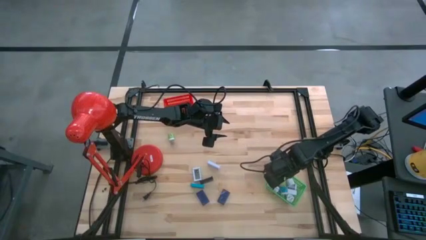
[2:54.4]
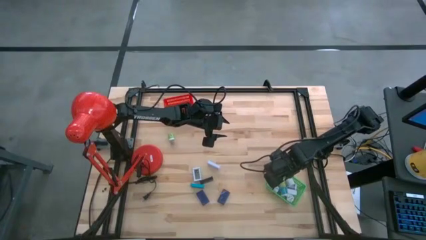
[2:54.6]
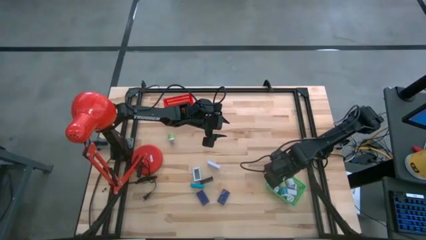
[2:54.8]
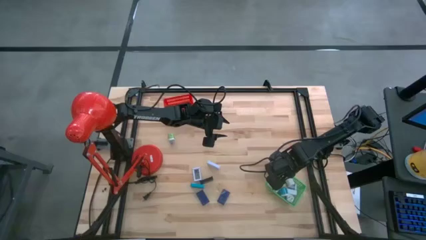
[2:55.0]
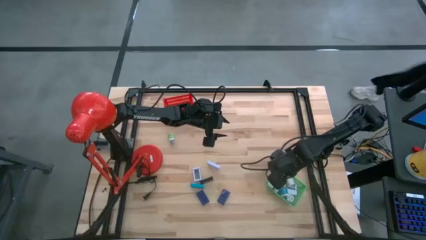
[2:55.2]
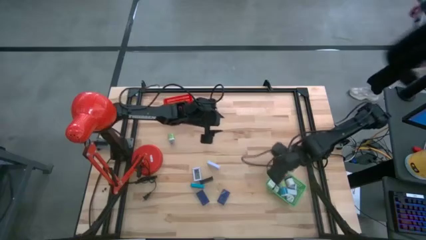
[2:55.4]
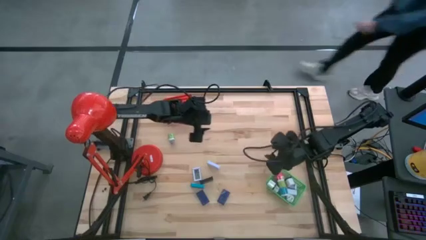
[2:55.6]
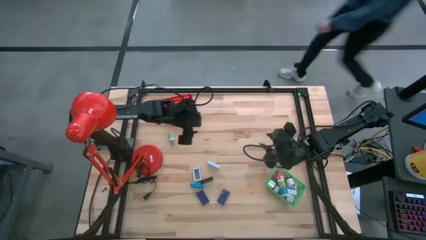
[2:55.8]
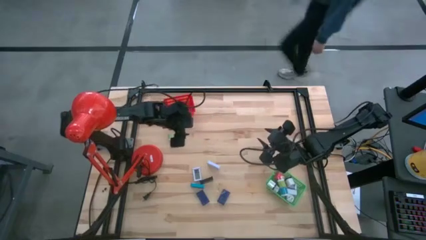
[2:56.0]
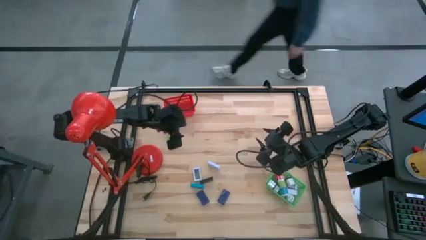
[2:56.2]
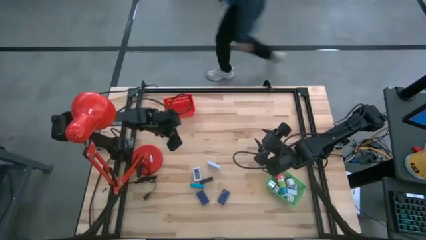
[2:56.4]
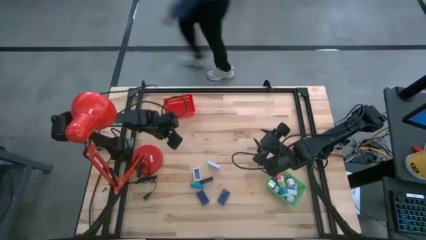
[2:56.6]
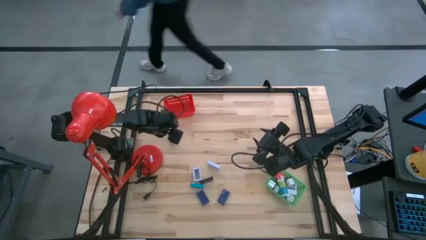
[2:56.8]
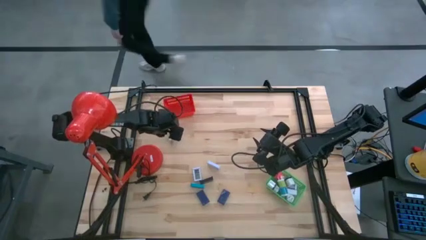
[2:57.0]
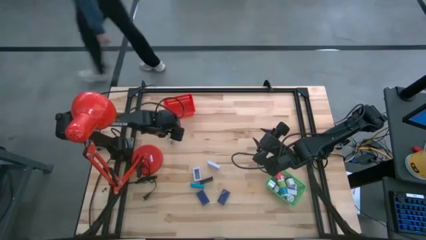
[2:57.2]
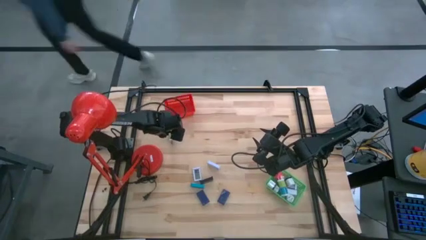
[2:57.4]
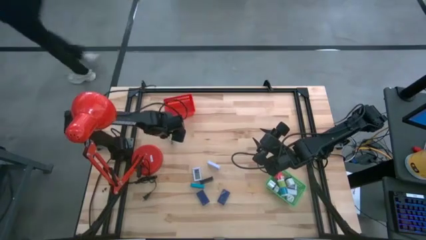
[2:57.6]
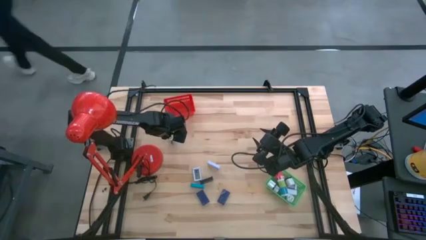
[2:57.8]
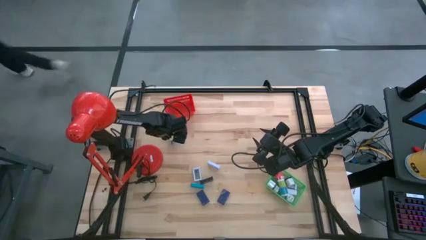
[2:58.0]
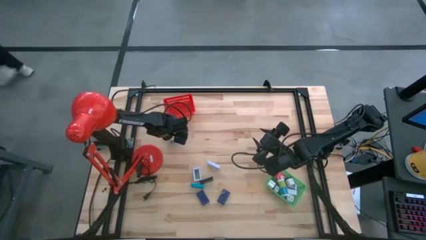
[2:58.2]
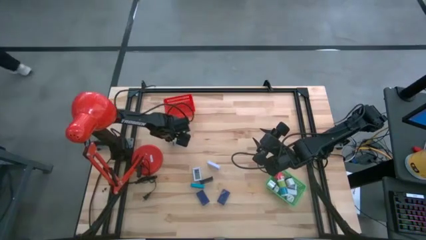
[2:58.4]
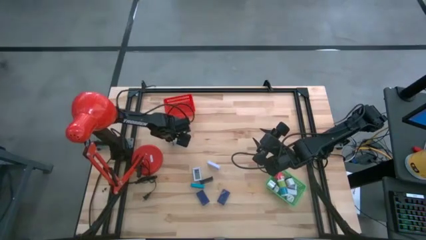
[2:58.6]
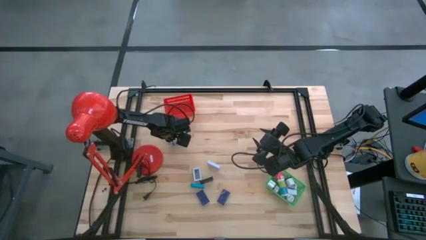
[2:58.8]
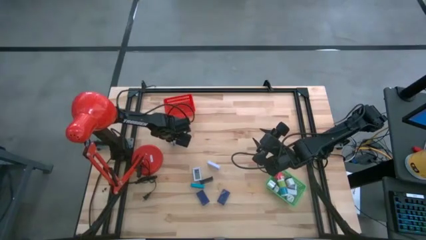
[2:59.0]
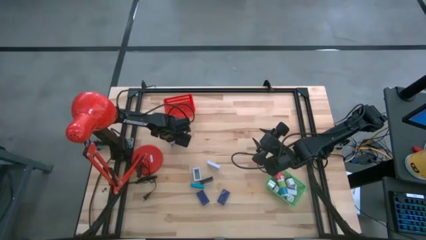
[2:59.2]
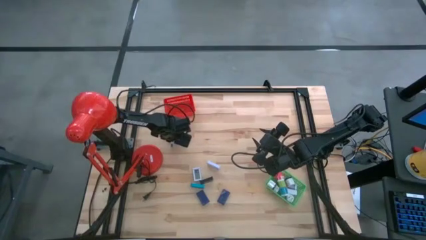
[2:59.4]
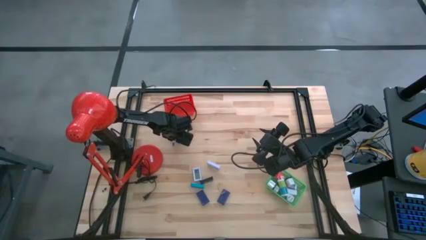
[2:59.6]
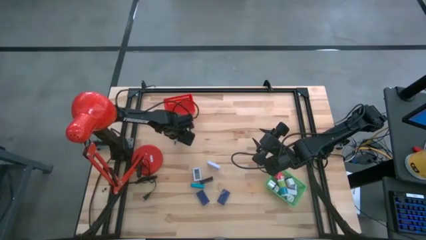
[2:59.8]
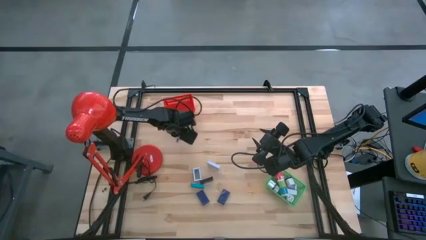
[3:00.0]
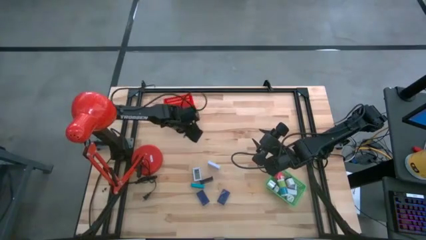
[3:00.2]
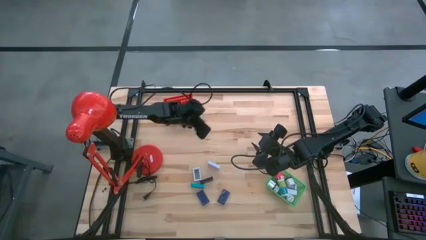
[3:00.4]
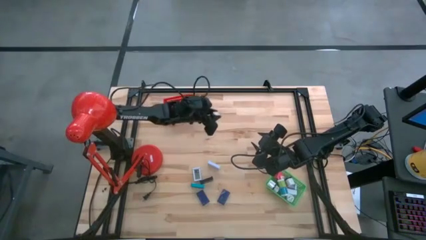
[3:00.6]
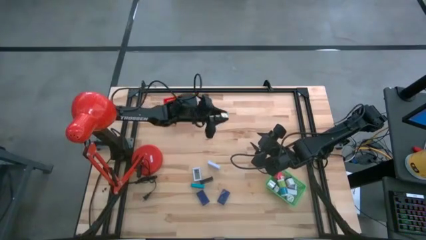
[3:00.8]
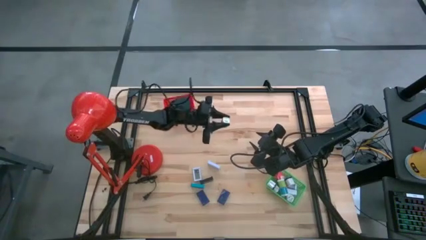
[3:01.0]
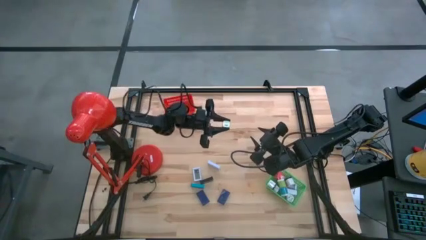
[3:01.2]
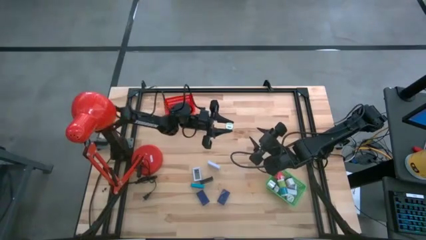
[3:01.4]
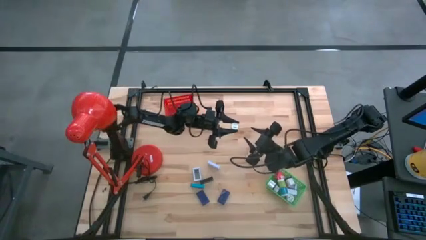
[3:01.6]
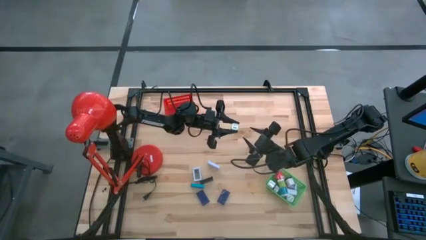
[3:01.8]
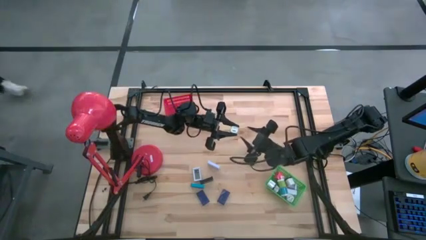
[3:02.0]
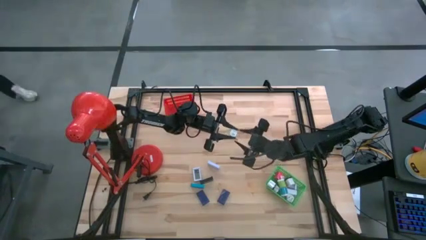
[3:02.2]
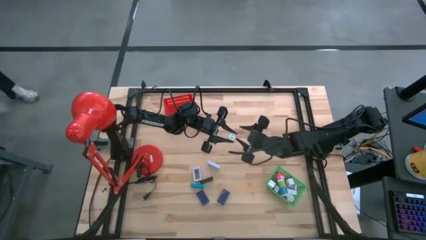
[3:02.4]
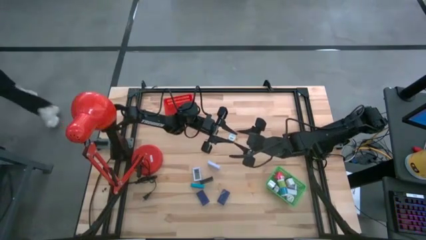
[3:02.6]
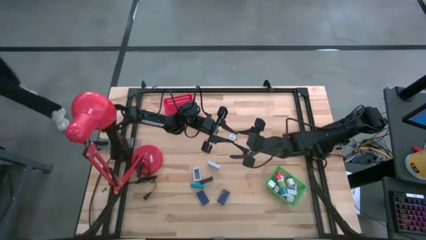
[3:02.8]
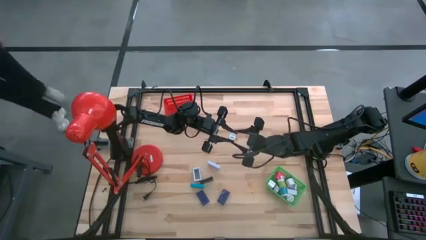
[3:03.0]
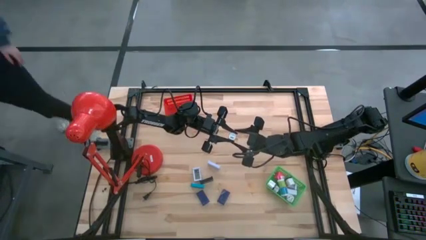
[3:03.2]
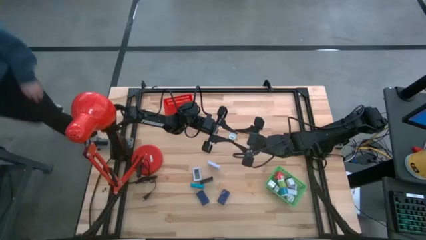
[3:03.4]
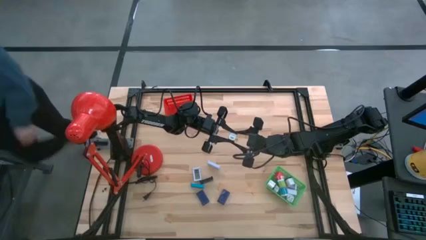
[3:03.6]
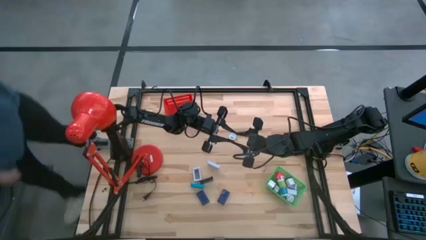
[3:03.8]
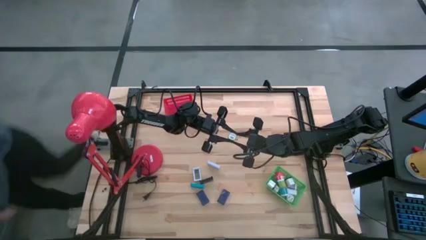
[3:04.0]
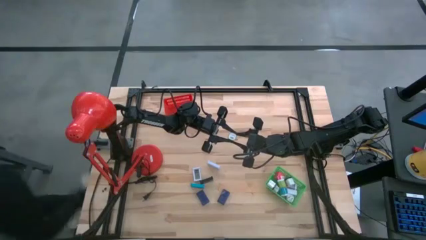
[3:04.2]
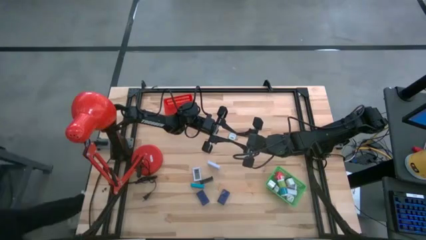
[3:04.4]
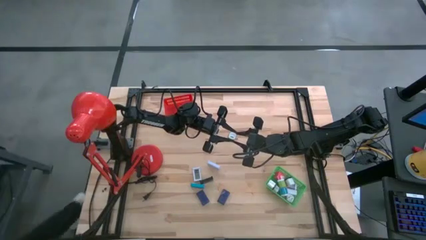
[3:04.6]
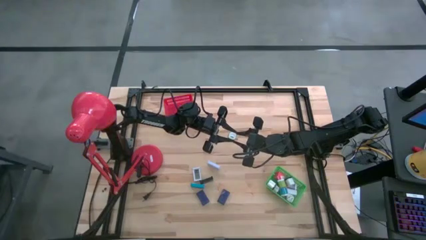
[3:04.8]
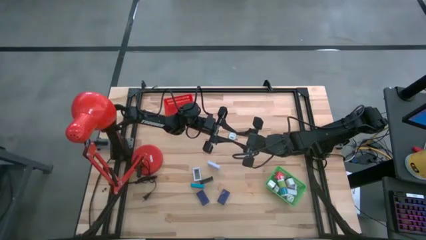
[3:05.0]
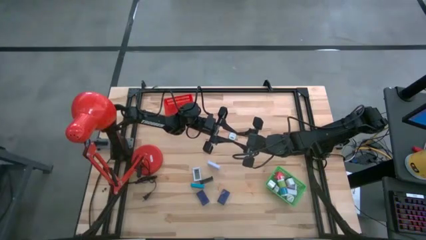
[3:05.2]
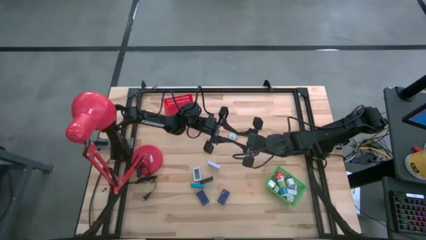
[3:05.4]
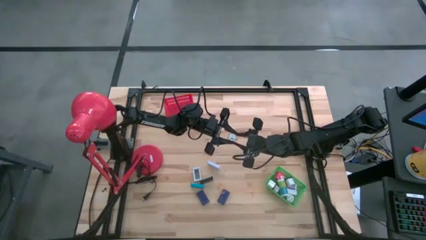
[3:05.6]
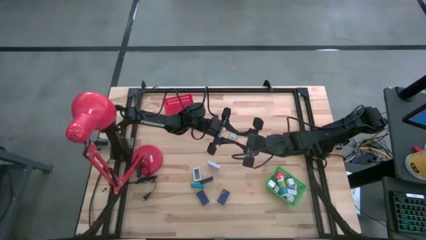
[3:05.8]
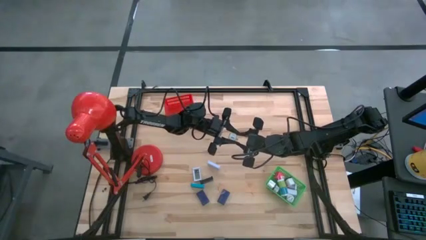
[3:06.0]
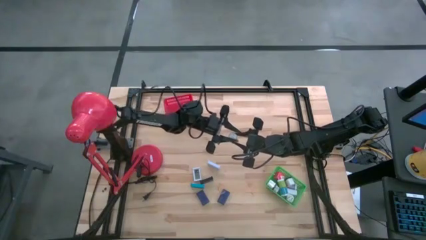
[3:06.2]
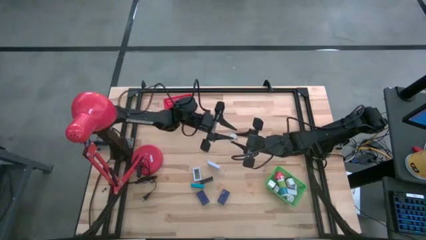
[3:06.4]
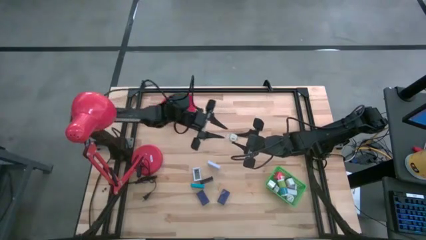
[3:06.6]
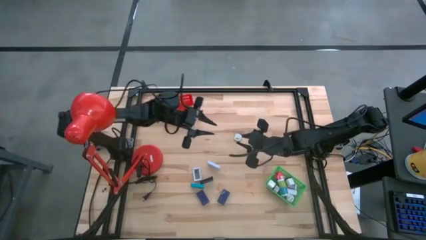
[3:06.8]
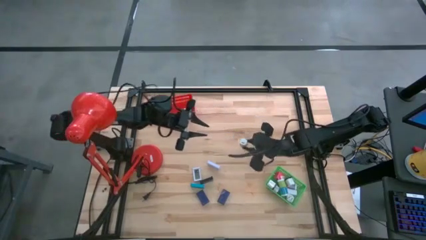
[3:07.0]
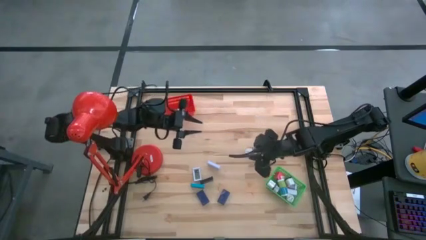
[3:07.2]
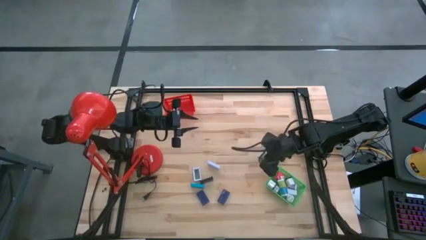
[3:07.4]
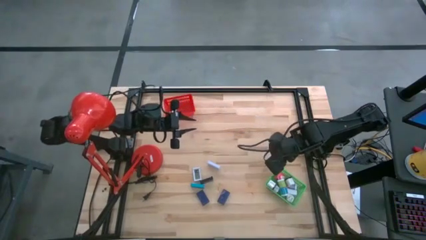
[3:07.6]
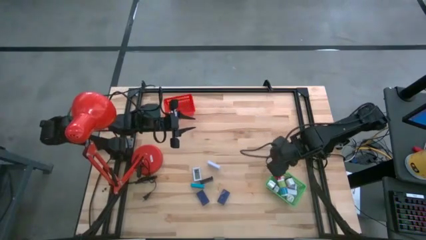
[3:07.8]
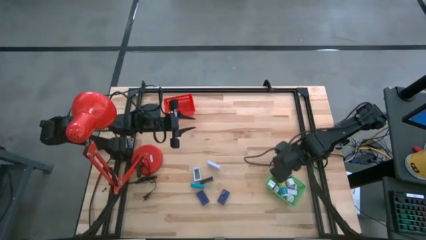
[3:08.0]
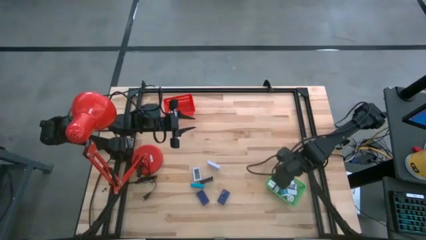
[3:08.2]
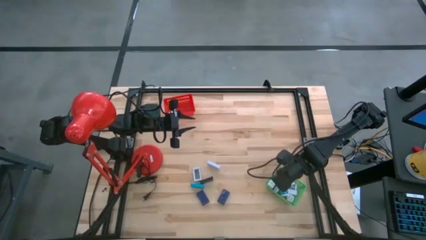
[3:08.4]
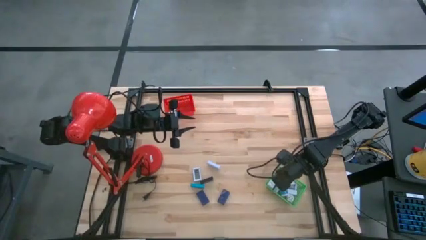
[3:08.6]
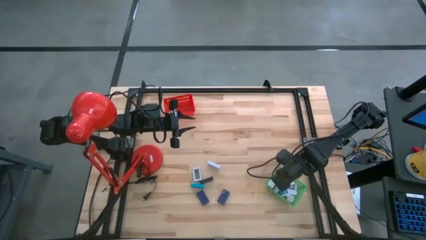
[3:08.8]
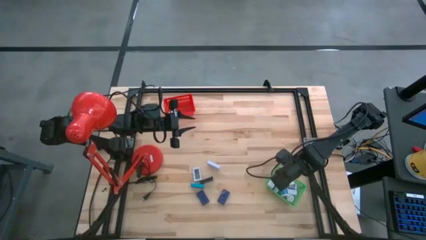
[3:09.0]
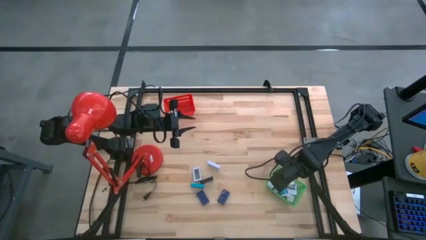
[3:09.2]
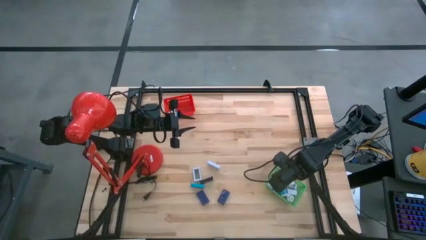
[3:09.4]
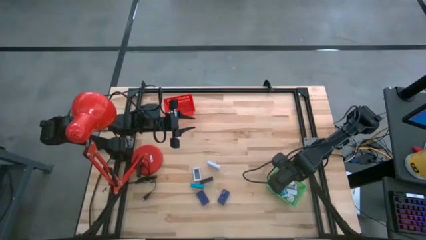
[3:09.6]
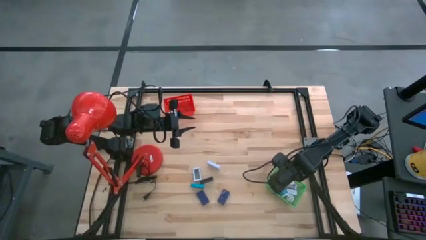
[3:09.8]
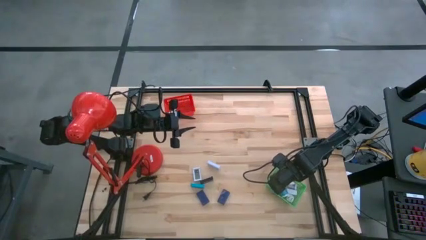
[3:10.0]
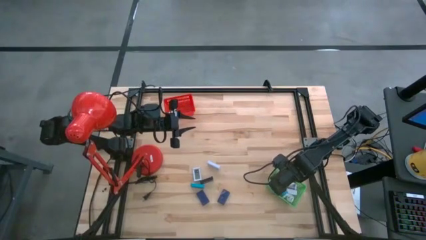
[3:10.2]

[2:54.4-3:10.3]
Task: Pick & Place Office items
Put the green charger adapter into the green bin
